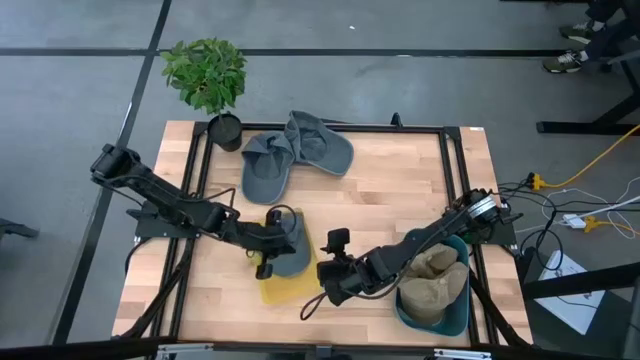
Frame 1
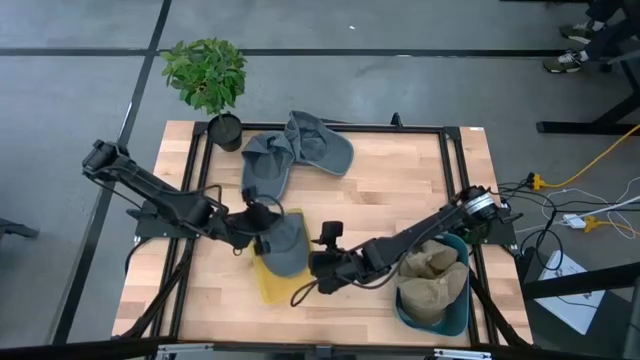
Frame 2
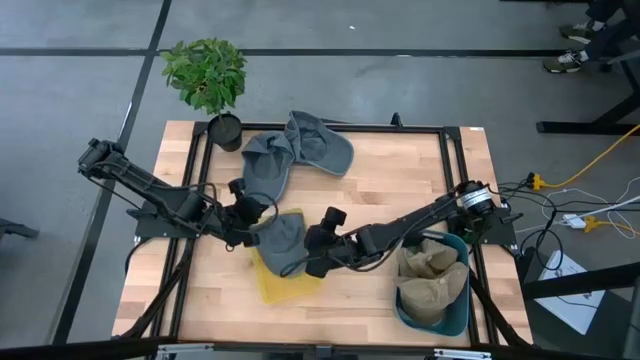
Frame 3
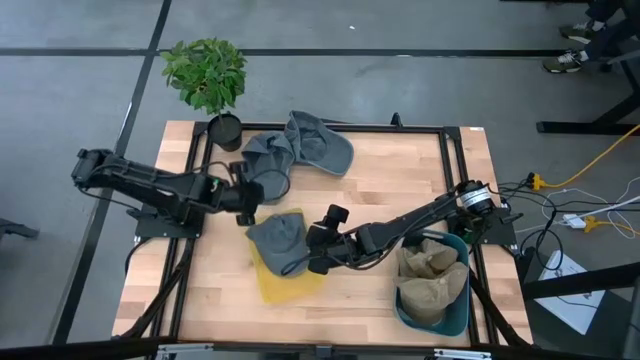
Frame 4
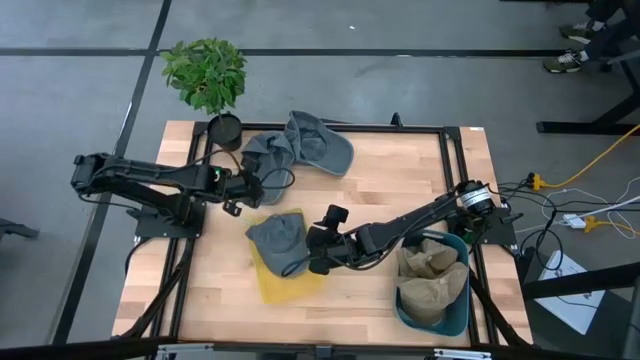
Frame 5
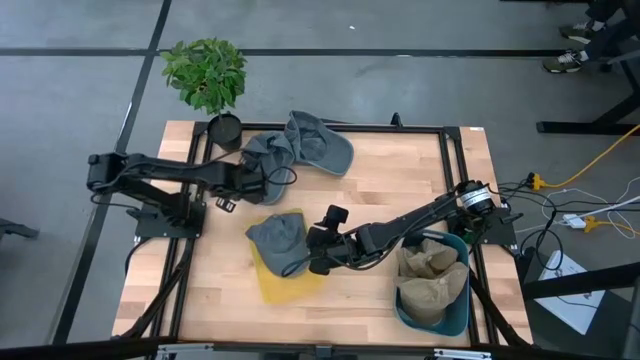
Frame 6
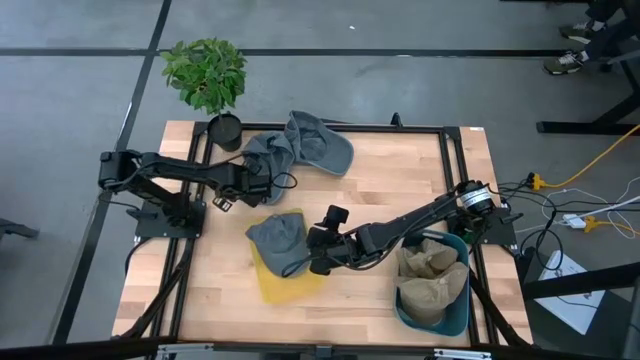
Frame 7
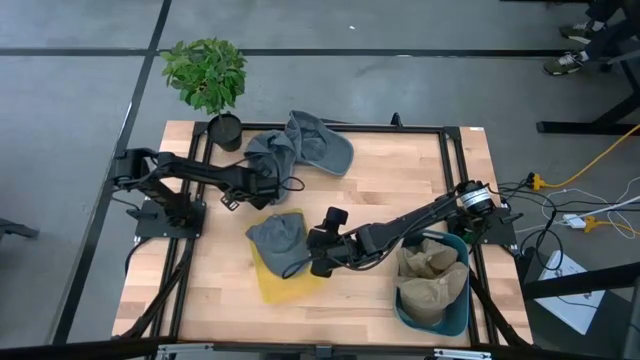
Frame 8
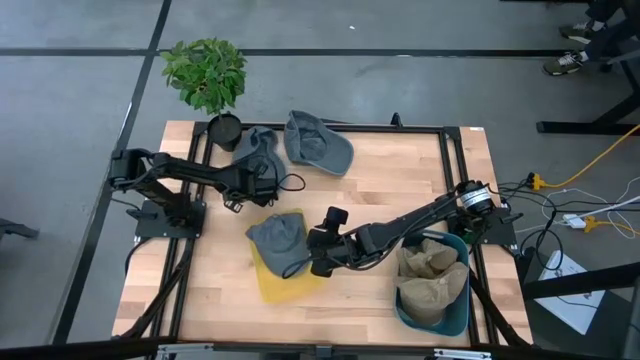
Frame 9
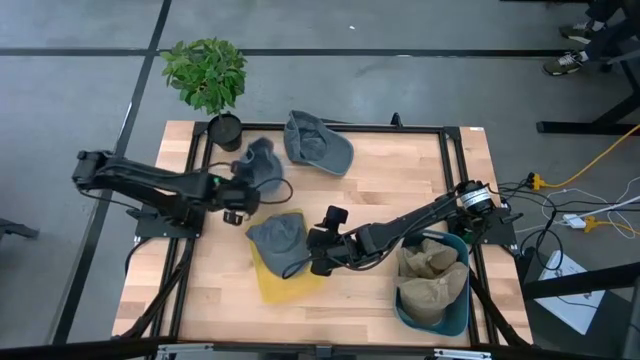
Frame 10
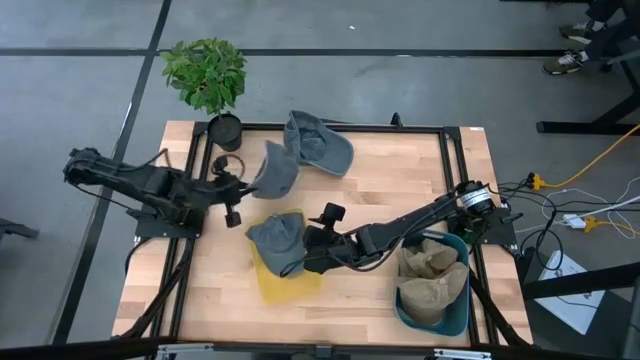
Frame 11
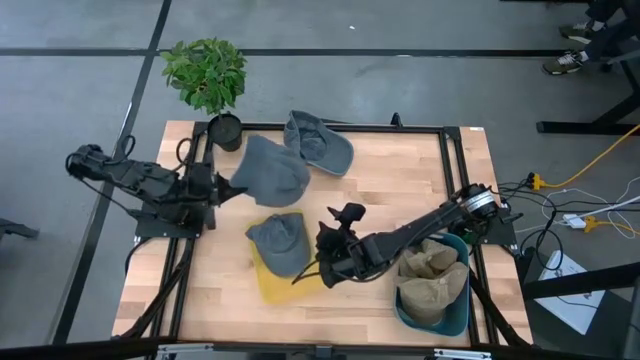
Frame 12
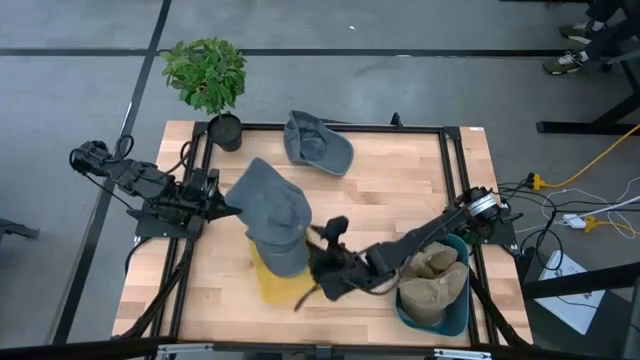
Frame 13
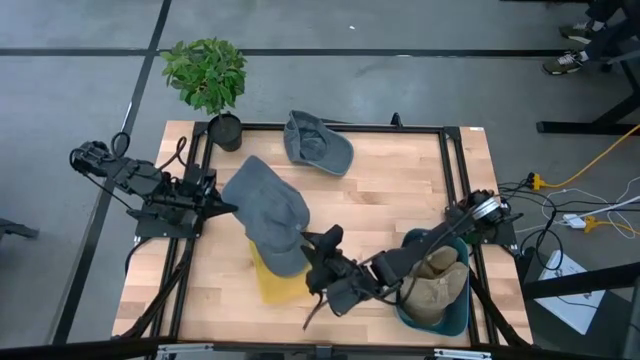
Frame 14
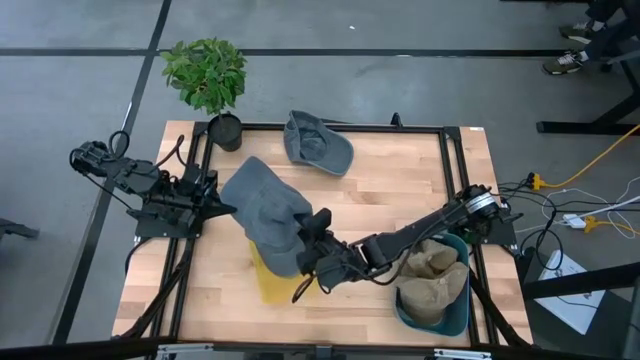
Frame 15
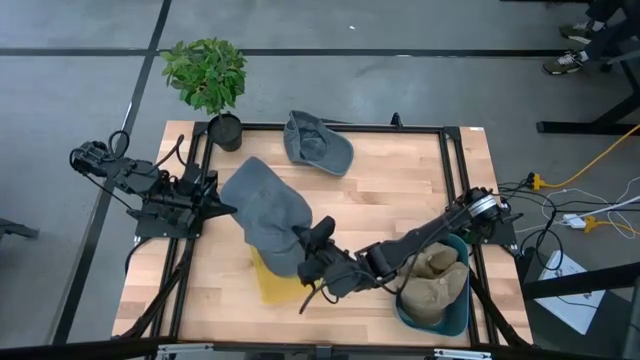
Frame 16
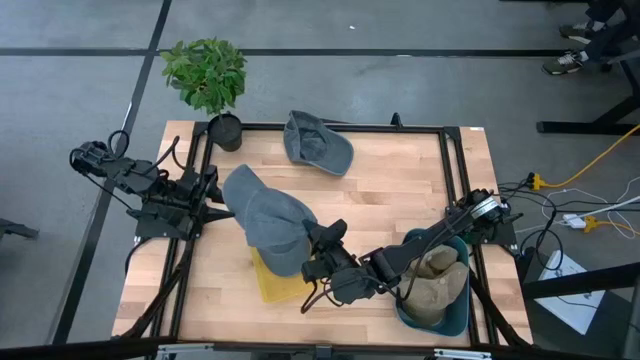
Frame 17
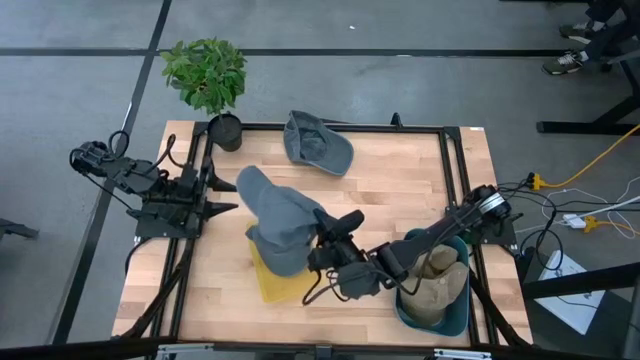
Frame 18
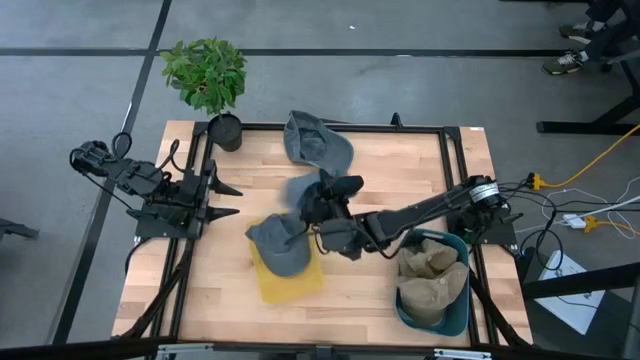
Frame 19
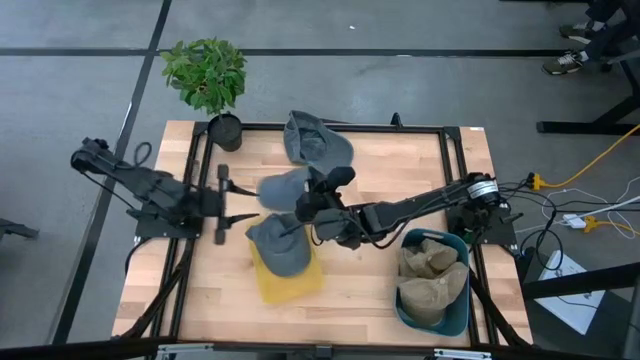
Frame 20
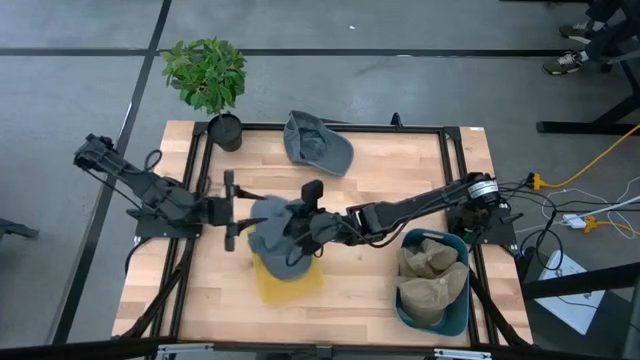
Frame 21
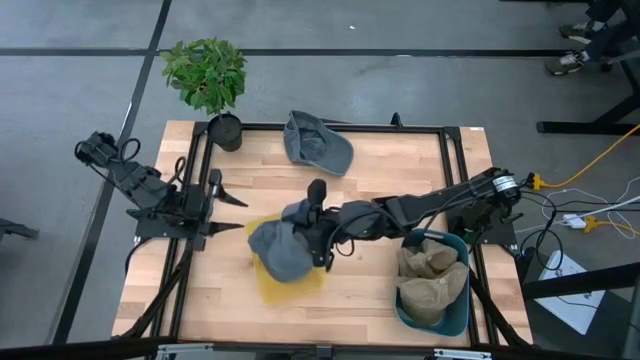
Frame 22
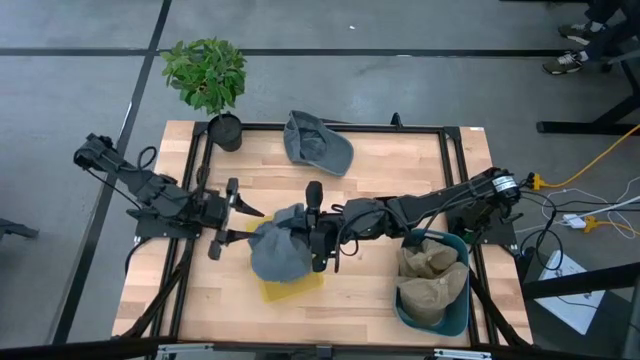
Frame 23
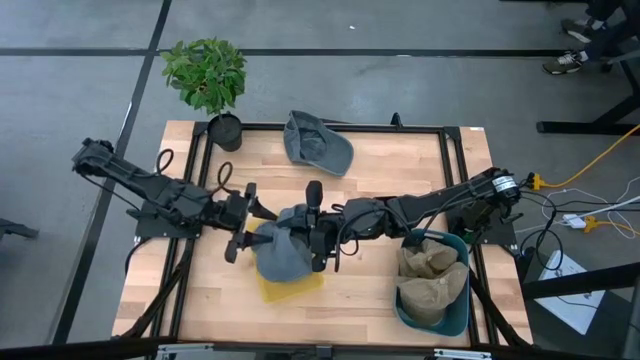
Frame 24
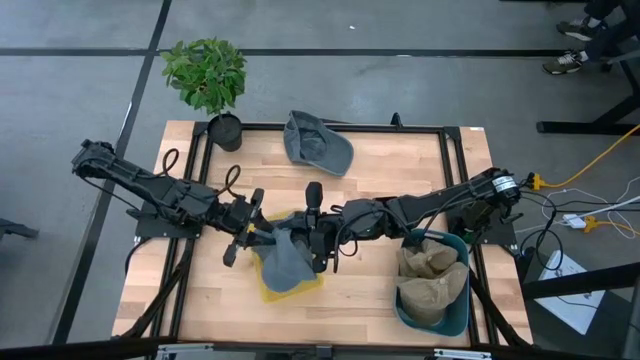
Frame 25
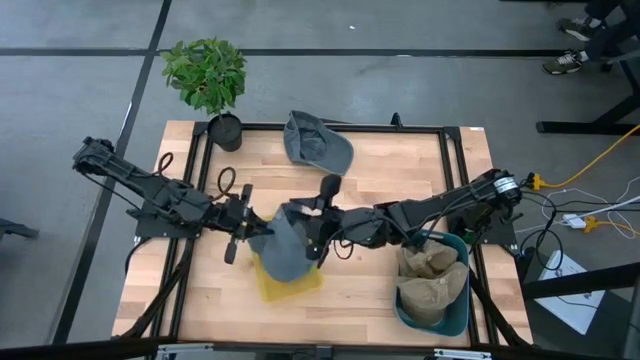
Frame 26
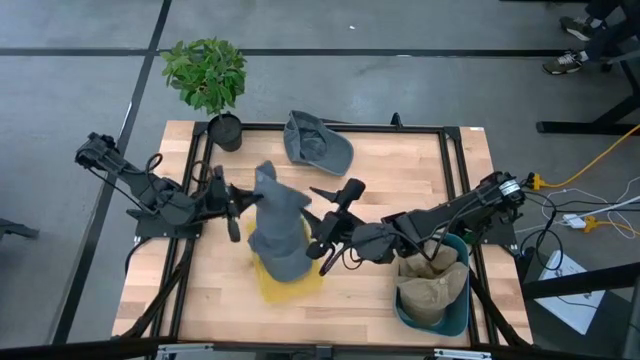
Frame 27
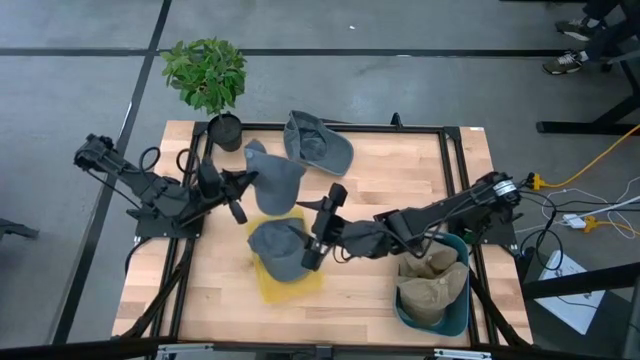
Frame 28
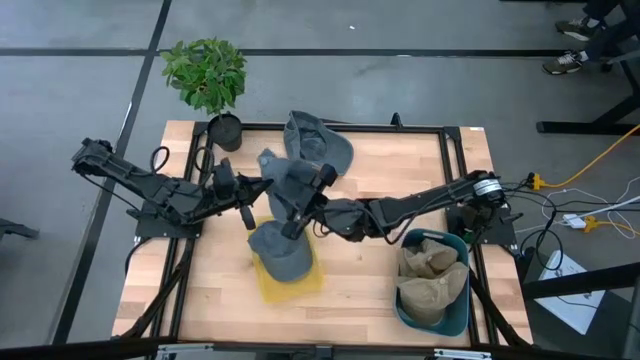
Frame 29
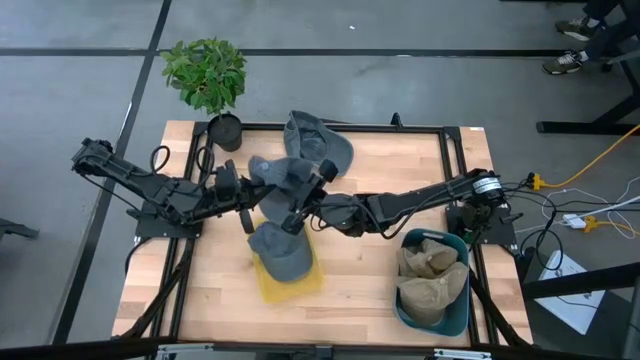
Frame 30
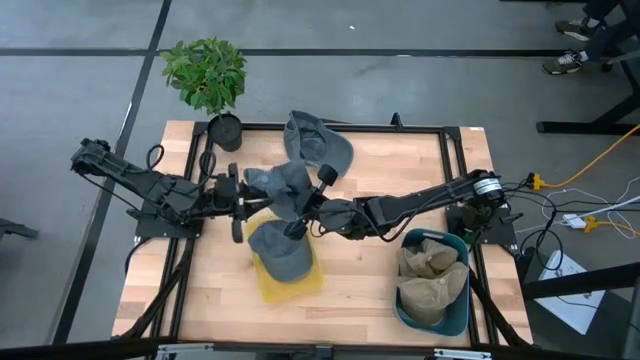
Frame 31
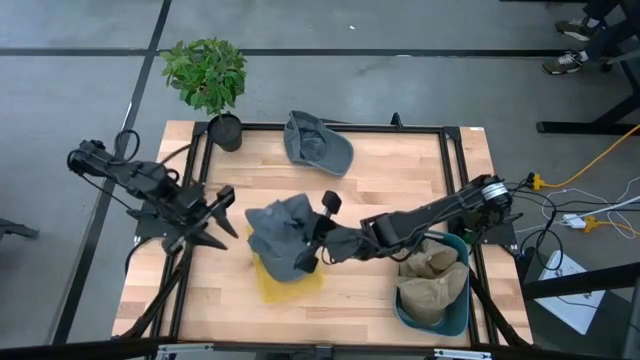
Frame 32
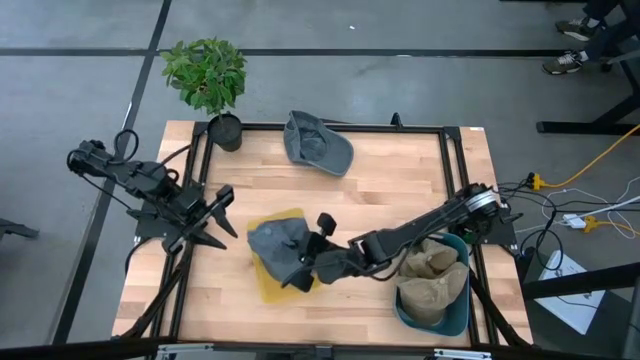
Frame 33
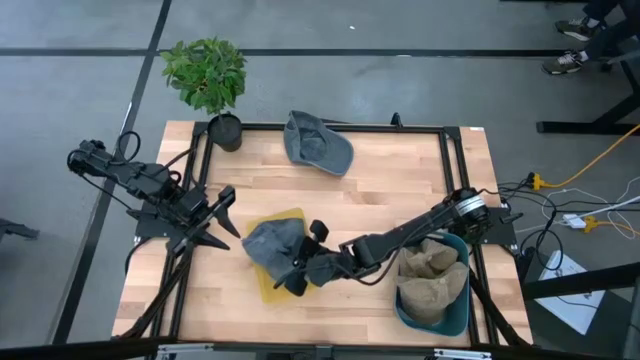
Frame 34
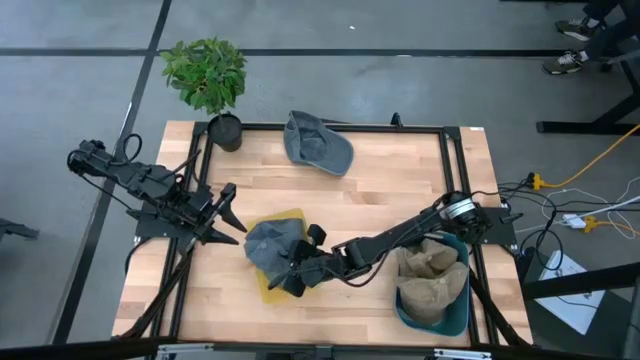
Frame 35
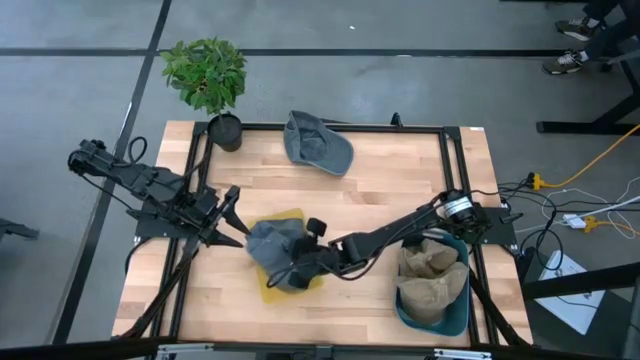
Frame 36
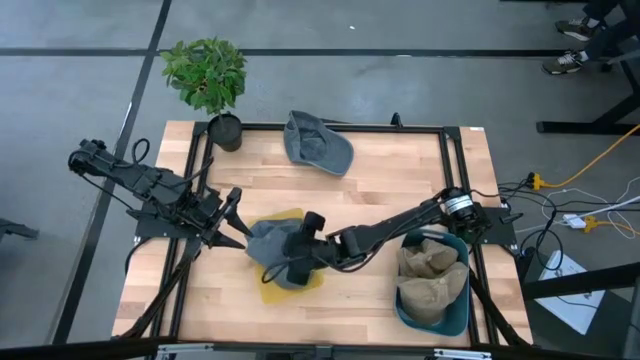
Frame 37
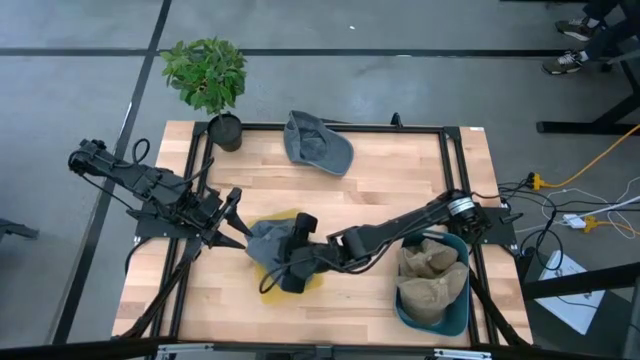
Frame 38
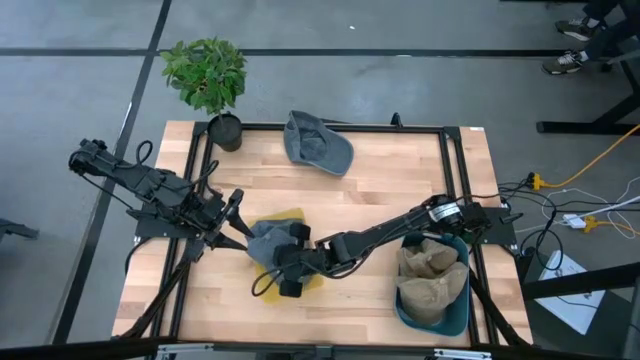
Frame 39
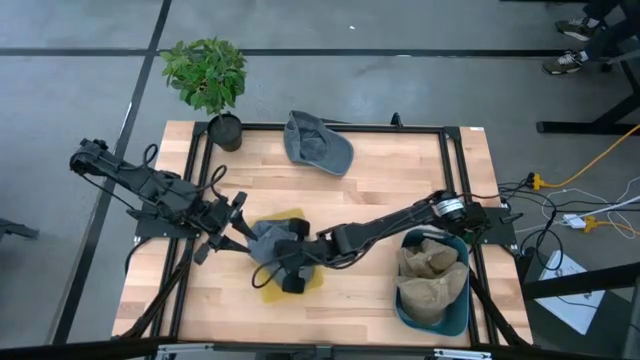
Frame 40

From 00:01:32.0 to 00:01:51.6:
Task: Pick & Place hat
Put the left blue cap into the yellow bin

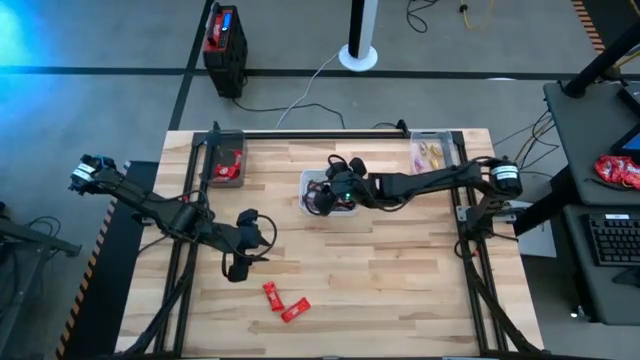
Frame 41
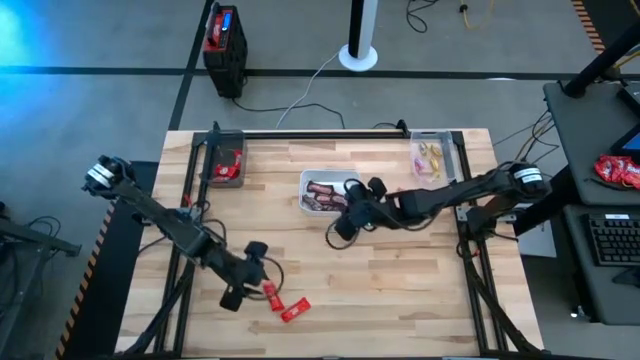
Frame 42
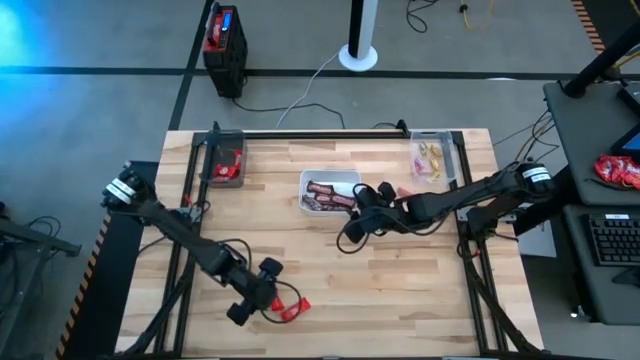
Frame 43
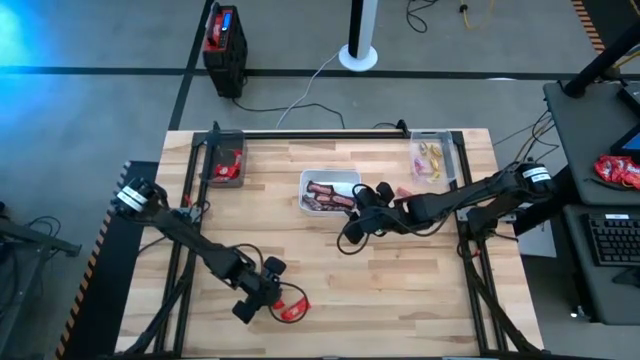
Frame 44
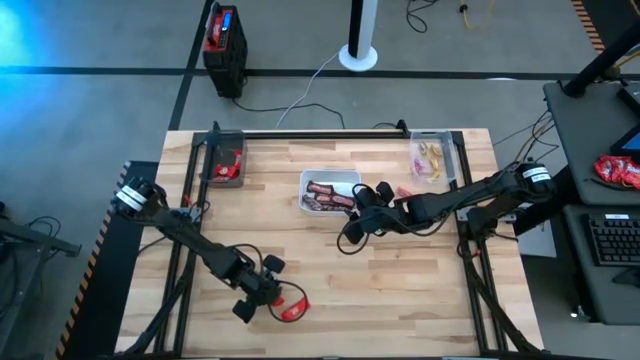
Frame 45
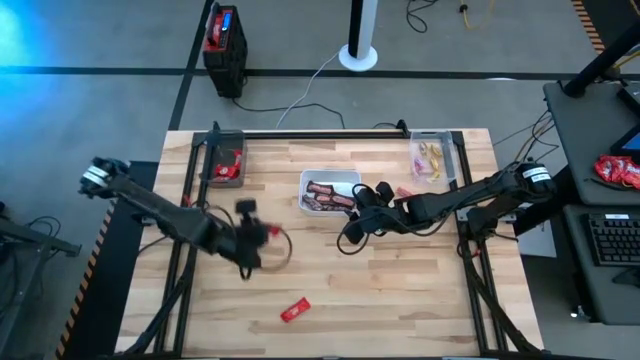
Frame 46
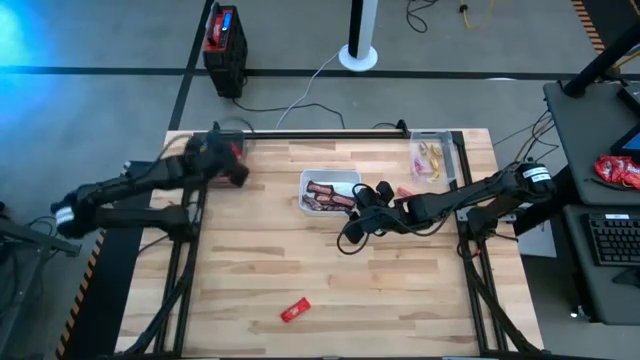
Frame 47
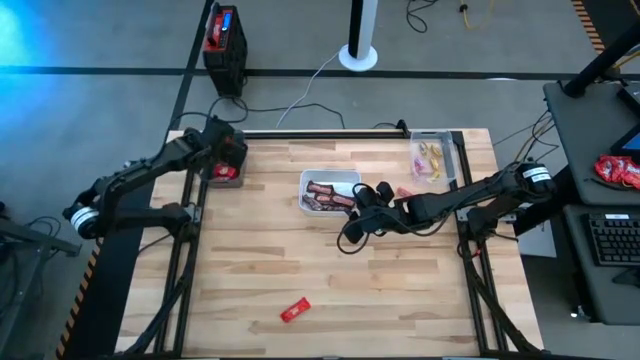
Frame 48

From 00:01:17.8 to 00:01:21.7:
Task: Sort candy by brand, put in halloween buckets
Put the red chocolate bar into the black bin
